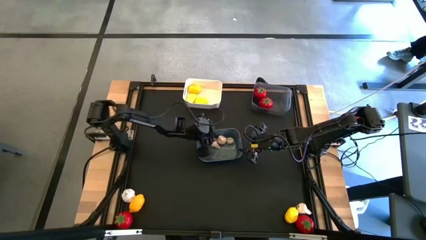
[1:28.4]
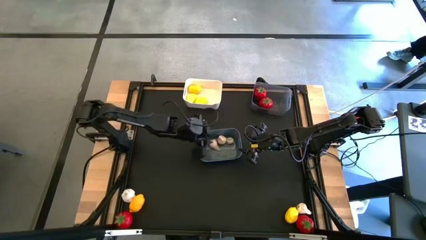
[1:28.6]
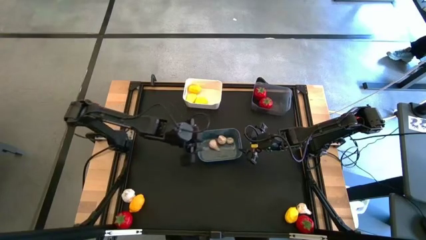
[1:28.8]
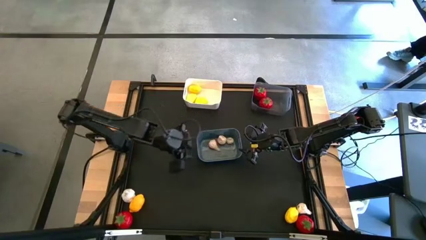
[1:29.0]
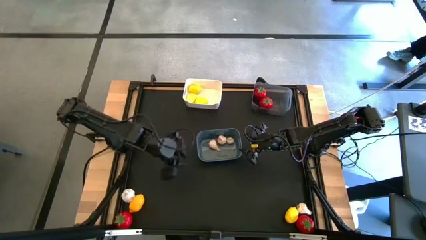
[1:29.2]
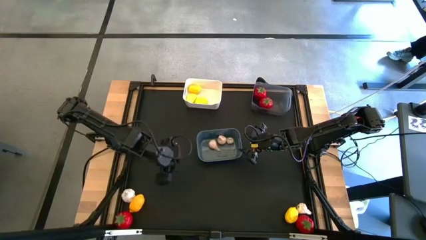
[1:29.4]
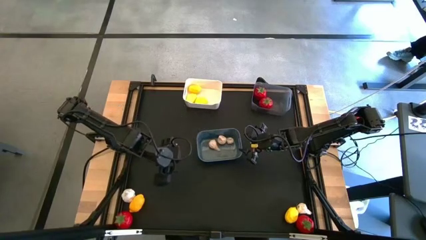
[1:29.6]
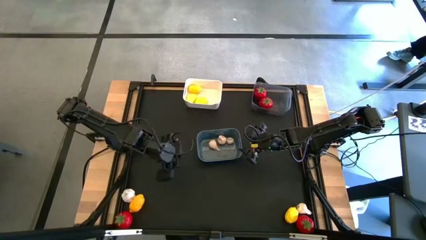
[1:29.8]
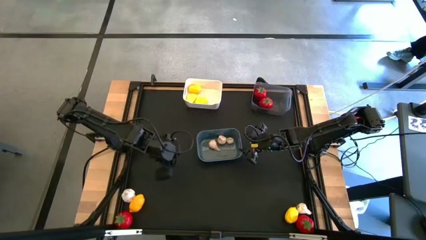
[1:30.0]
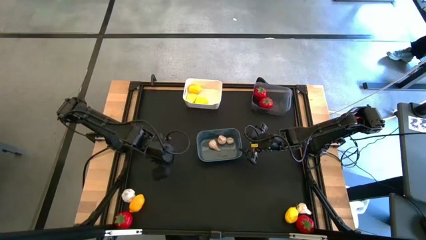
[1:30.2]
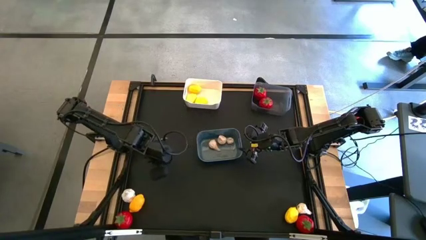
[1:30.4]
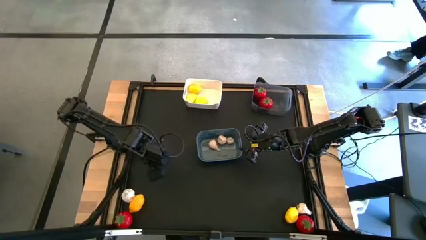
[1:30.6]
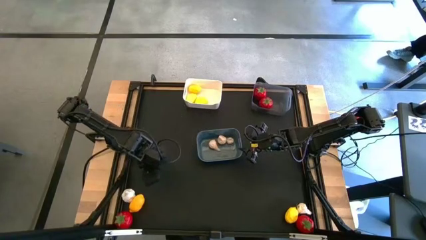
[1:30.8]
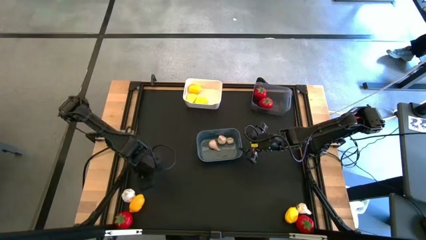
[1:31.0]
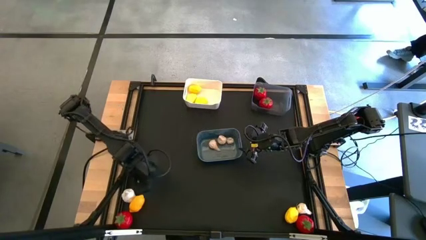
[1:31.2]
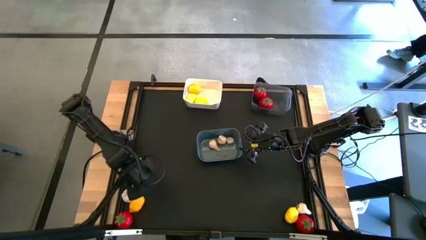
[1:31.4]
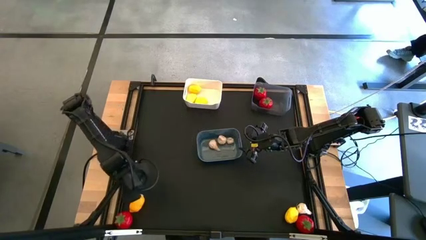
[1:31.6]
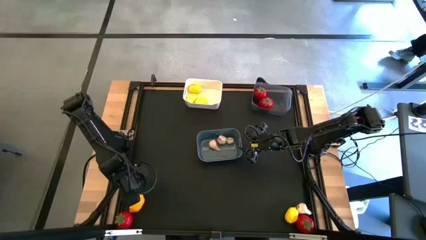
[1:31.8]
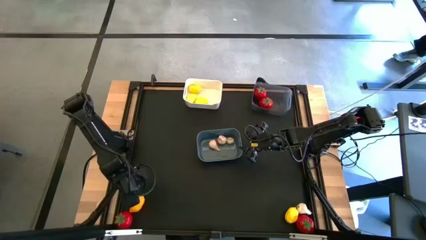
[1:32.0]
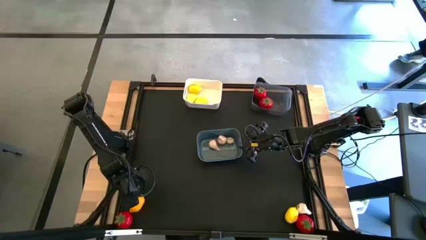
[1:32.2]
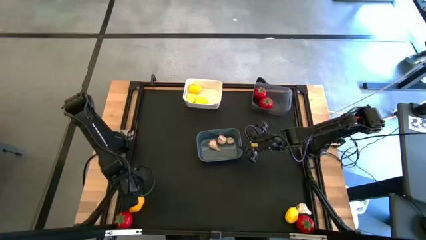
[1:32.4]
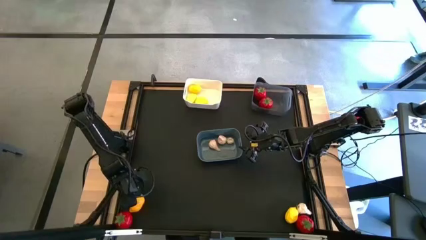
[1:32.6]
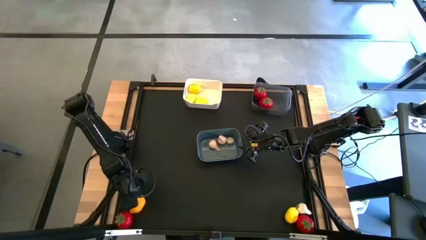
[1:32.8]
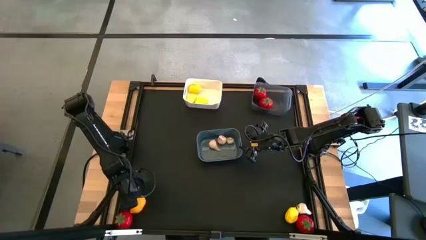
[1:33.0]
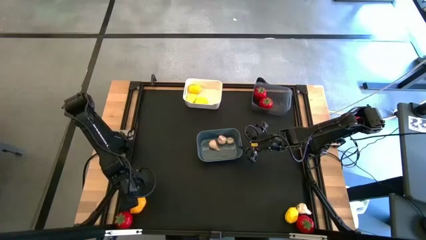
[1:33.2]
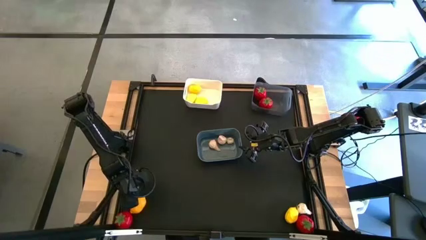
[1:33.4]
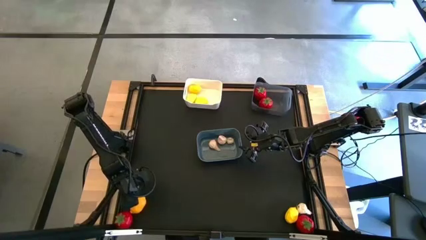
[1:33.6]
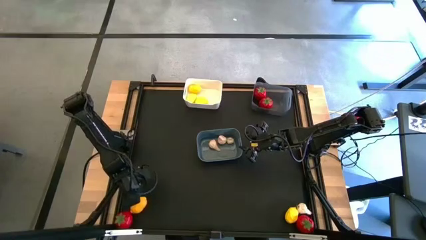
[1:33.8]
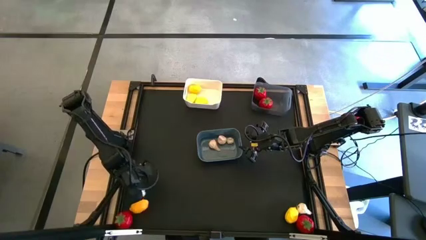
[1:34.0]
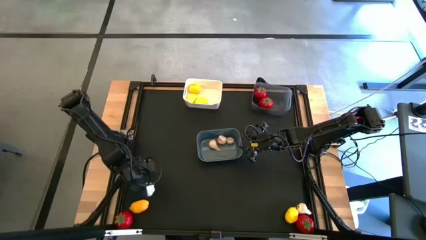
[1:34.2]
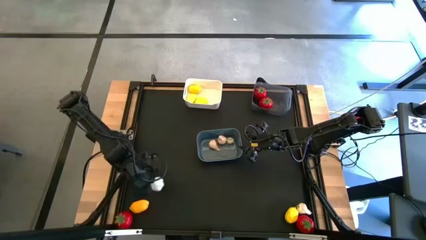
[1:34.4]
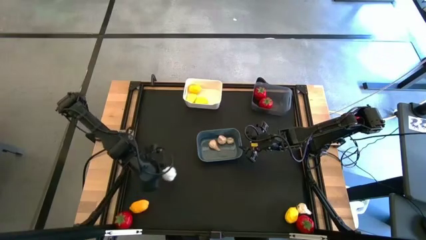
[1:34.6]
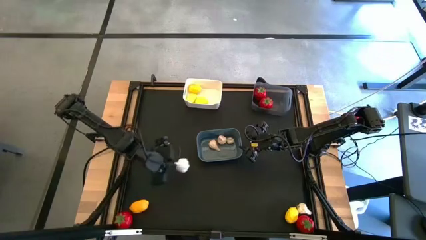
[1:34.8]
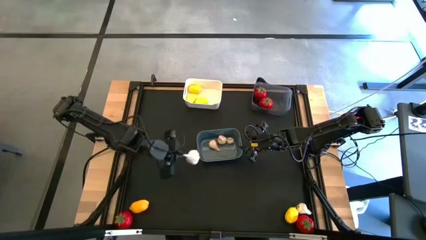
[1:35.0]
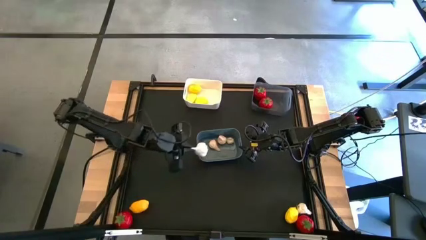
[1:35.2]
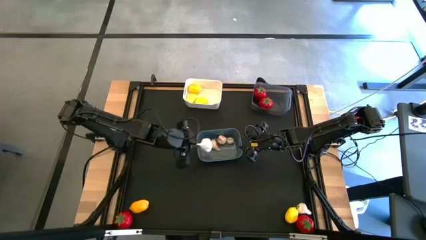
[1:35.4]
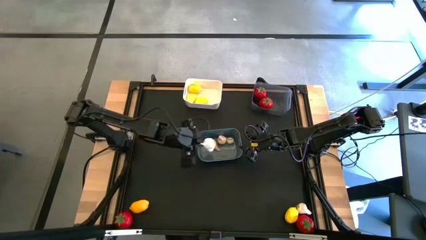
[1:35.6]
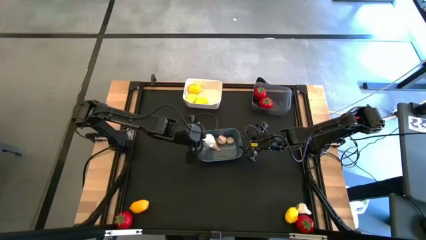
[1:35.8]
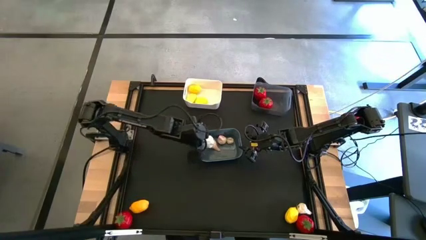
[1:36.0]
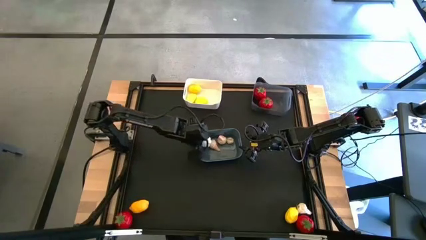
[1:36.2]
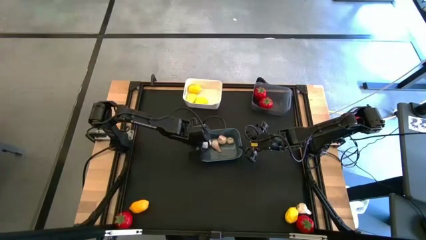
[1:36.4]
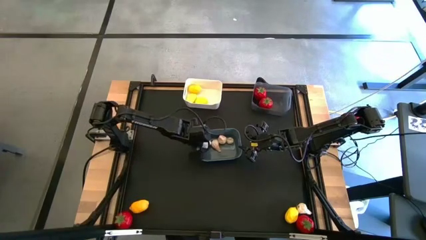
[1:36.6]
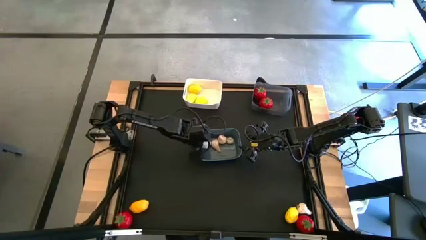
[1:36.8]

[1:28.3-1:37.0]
Task: Sort produce into baskets
Put the white garlic into the blue bin

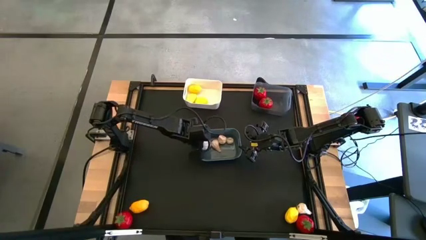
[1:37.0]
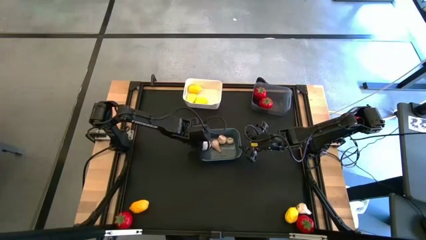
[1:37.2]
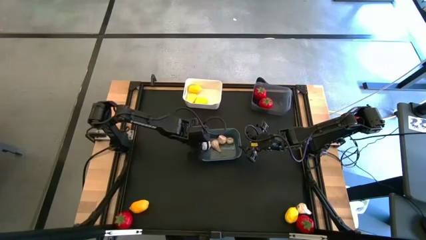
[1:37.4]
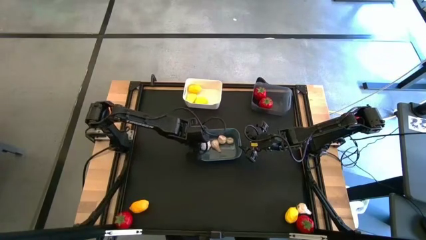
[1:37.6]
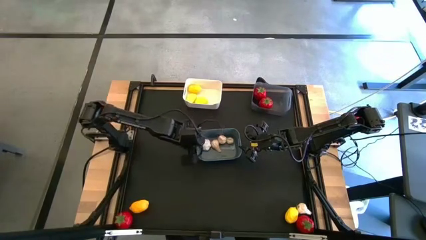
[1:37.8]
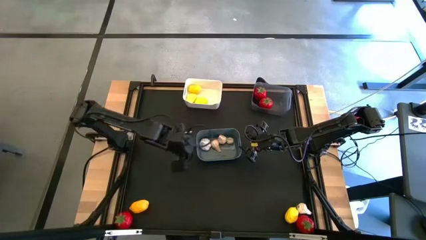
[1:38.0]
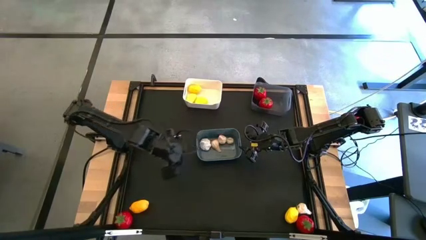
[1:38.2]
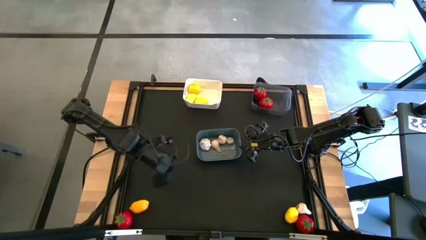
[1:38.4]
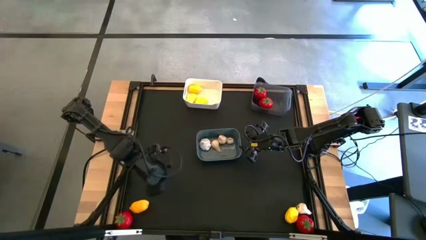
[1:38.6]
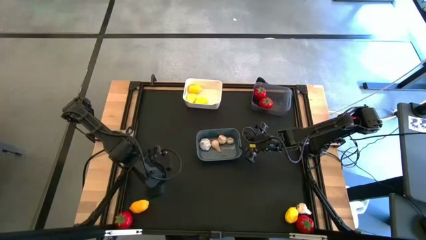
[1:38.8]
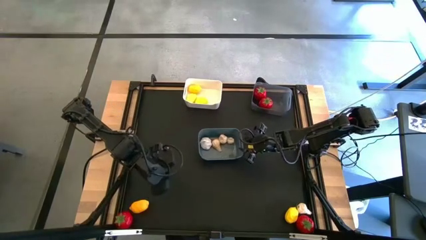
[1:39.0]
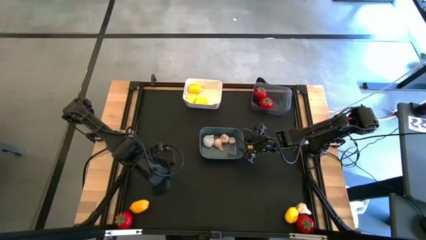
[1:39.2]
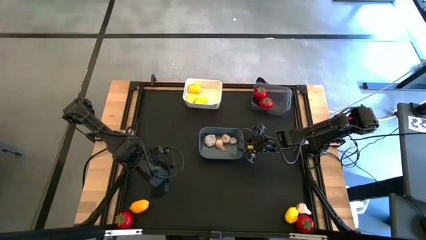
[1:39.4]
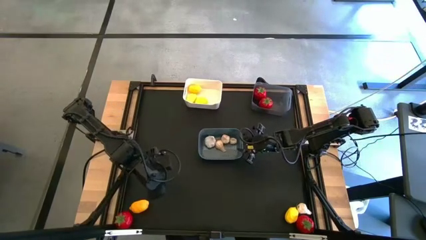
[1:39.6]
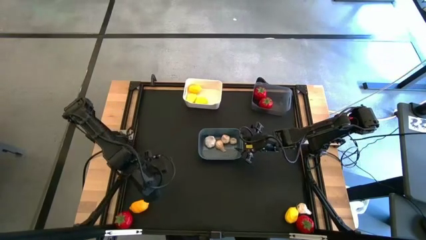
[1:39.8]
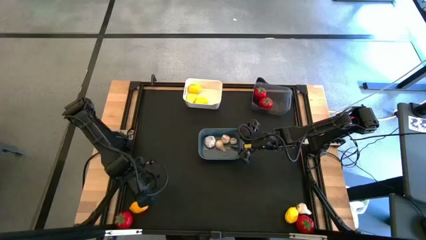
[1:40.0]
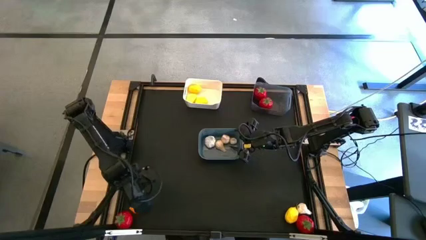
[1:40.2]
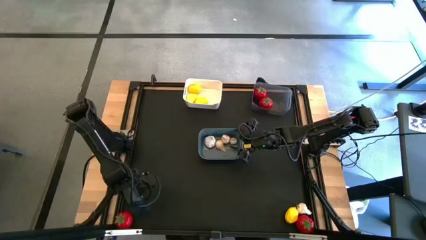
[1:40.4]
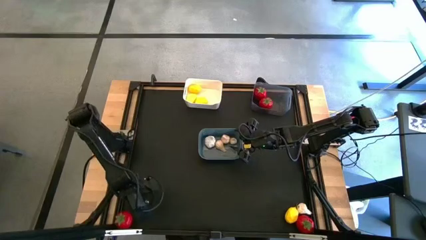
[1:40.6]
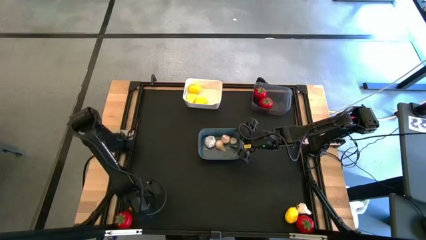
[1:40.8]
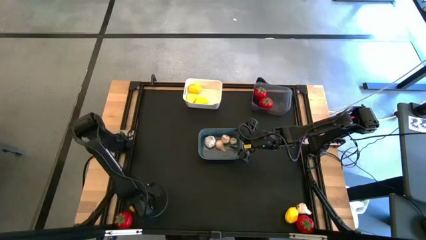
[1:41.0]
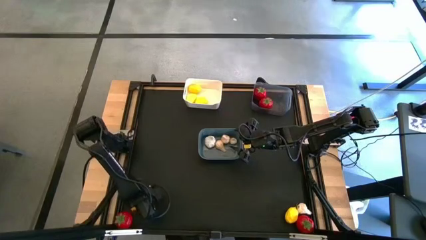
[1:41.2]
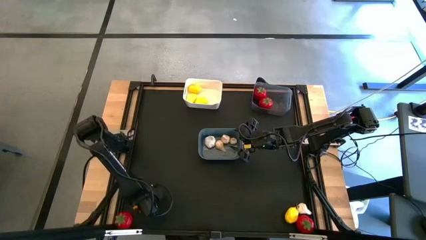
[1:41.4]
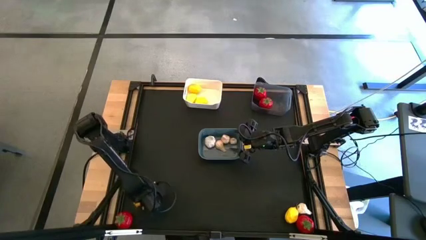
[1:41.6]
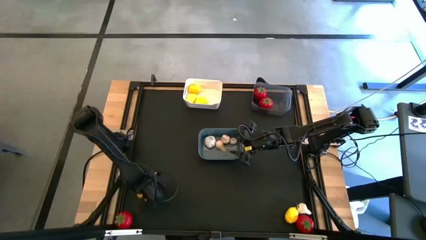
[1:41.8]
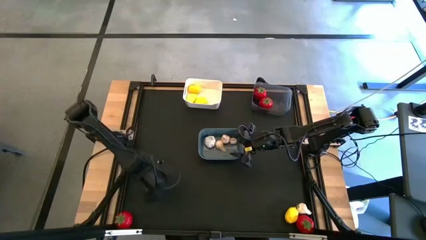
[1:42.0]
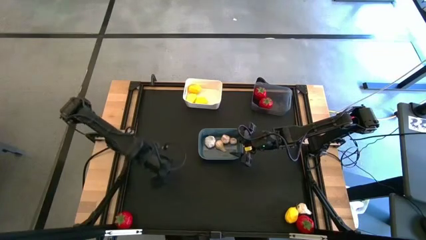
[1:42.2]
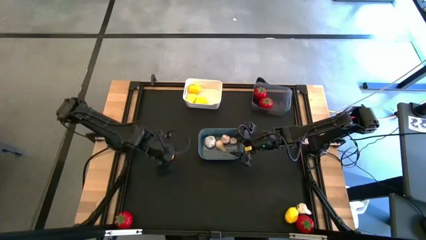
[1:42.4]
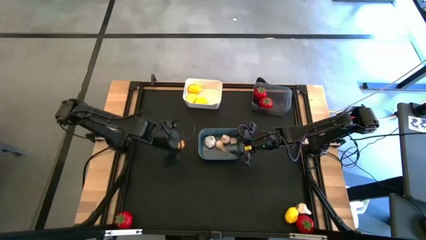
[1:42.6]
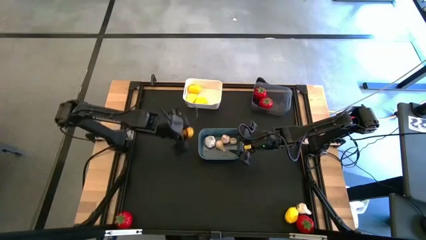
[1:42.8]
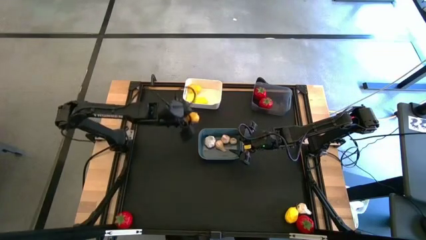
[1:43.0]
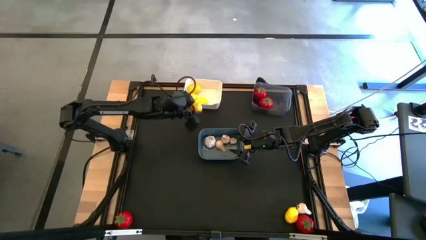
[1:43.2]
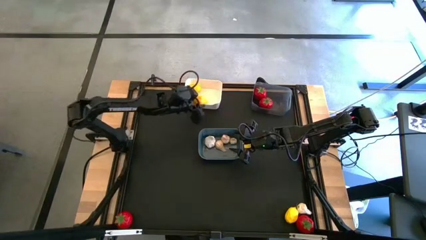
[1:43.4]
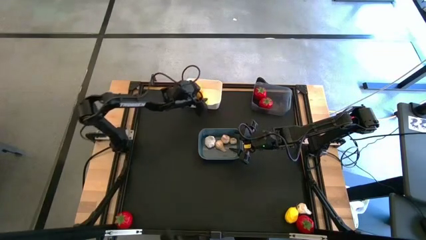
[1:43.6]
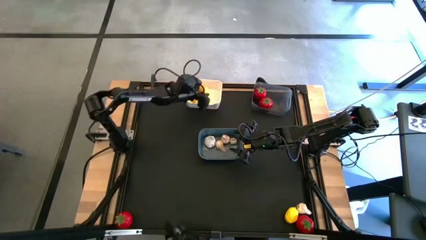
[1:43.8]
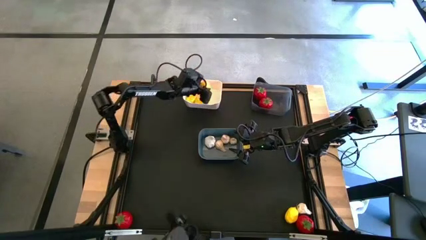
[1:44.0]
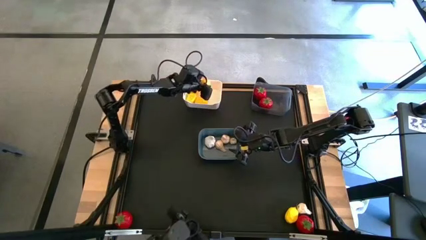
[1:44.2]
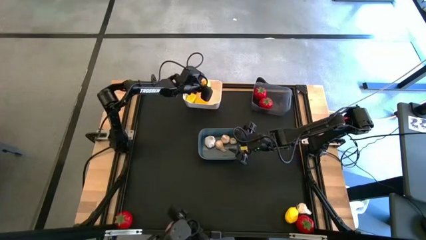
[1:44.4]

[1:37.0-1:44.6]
Put the yellow lemon into the white bin
